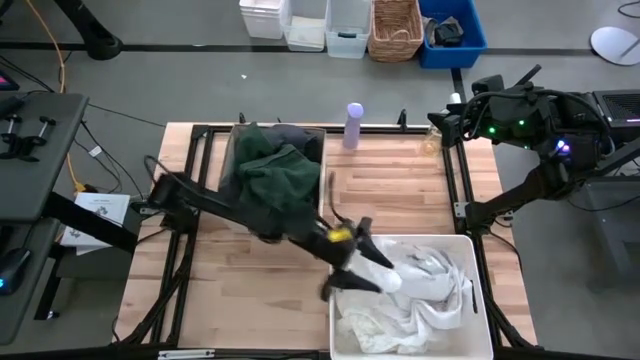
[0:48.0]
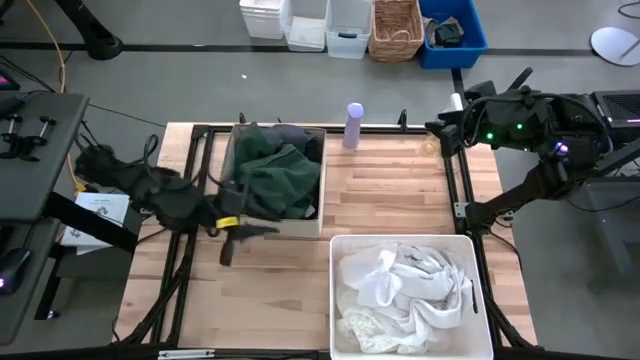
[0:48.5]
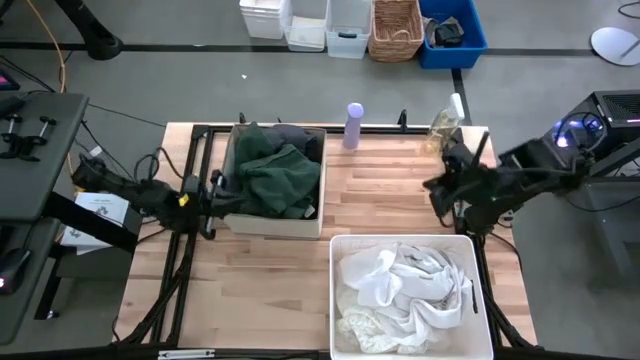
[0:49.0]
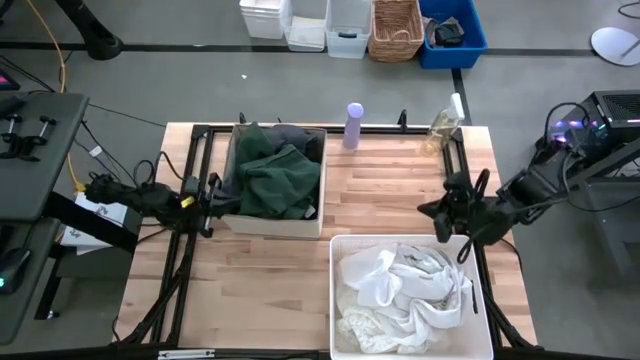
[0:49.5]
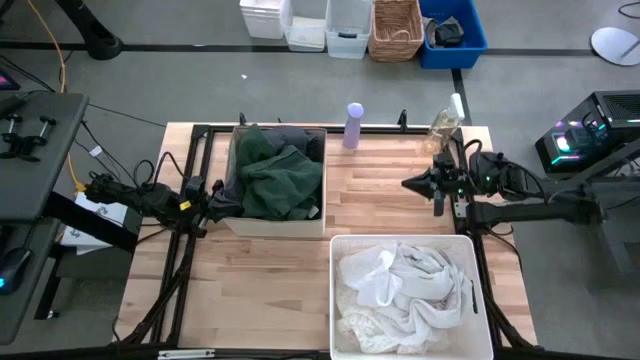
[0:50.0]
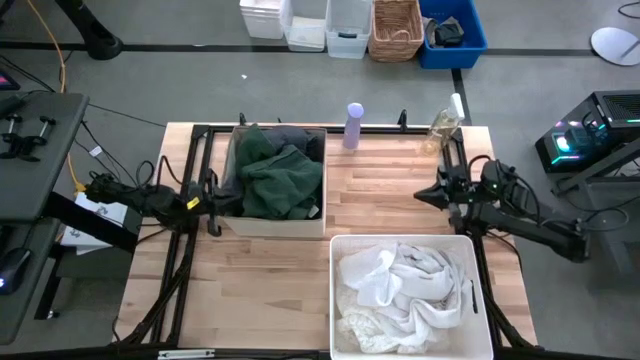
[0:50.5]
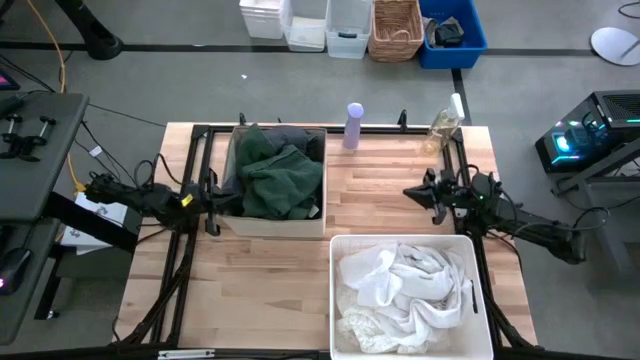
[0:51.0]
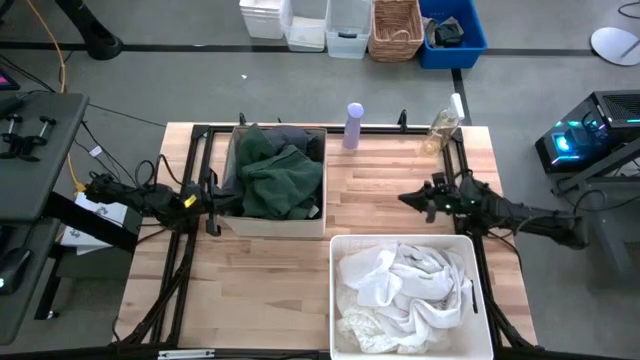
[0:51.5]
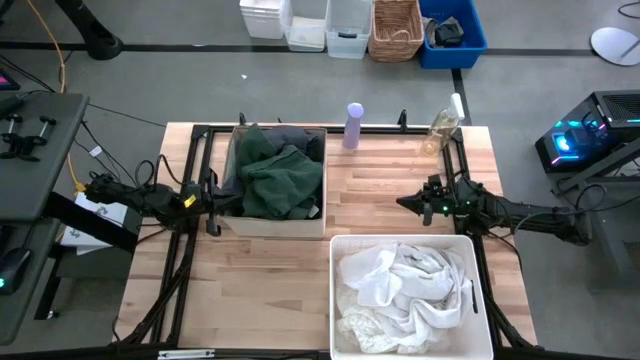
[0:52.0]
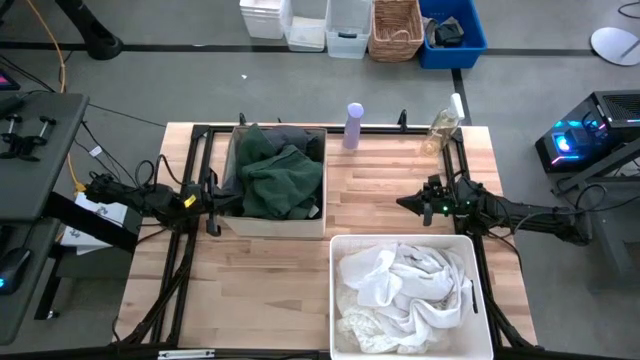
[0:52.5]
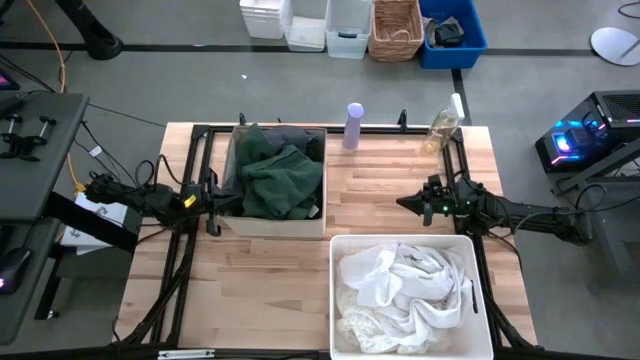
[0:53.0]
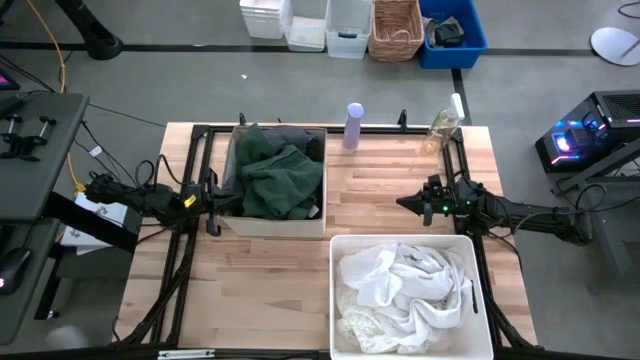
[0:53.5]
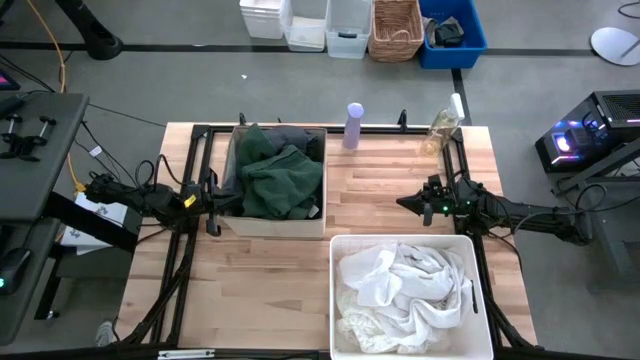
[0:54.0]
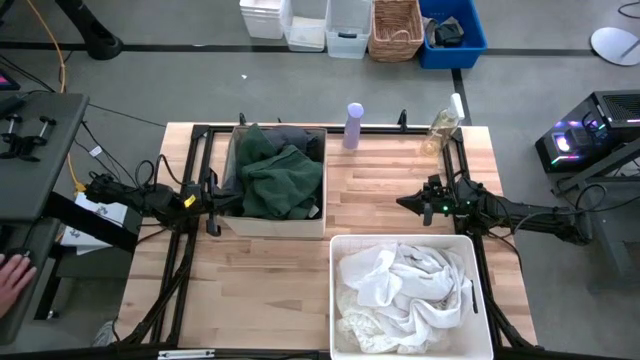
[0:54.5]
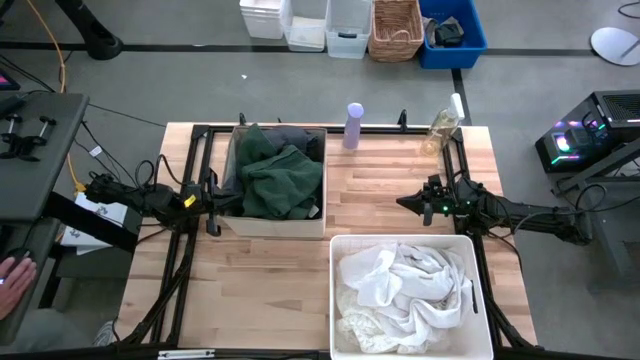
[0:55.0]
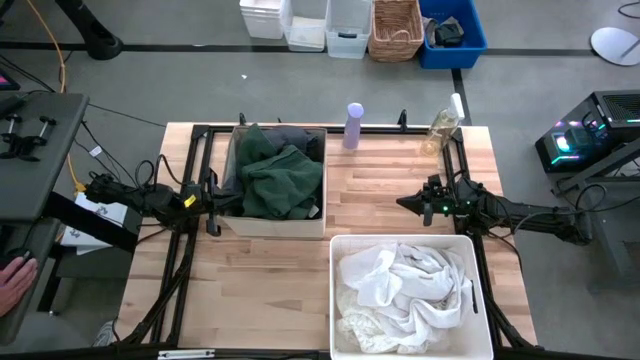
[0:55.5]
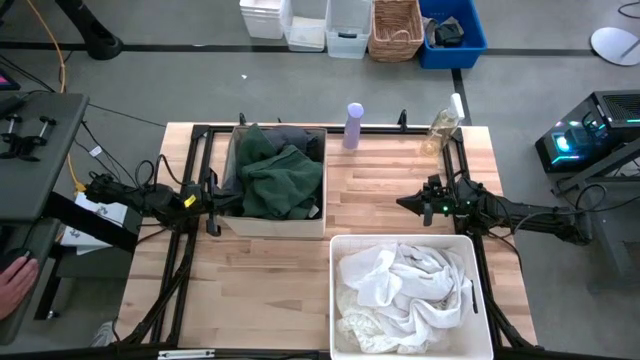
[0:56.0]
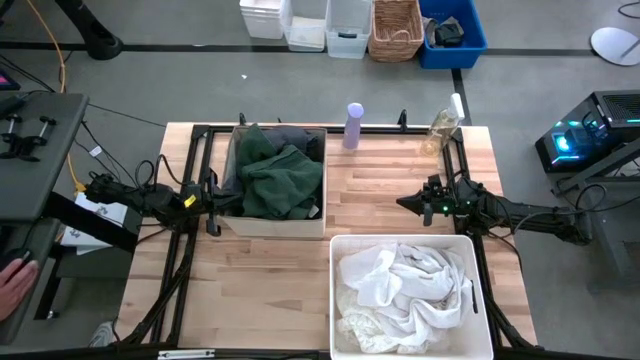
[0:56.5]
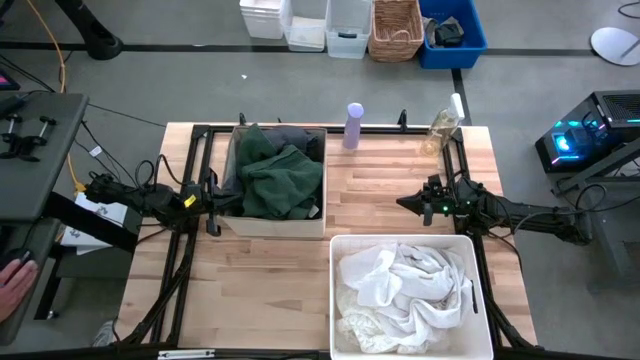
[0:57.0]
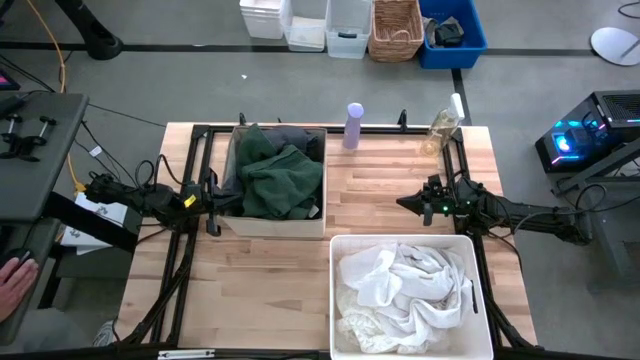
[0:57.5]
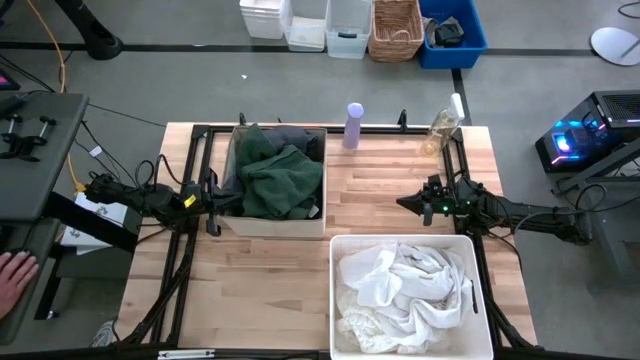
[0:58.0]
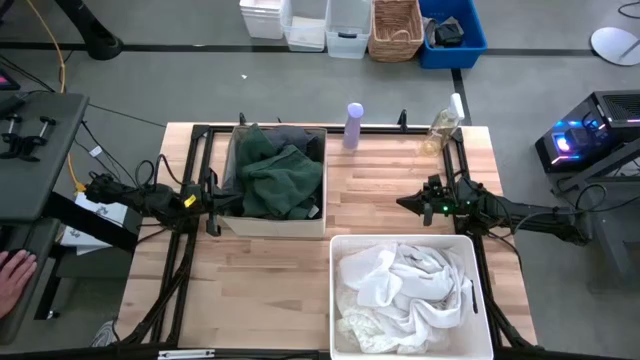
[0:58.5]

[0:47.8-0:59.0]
Task: Sort clothes
Return to Home Position
